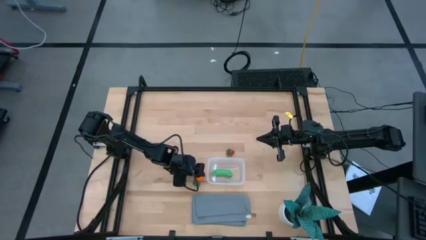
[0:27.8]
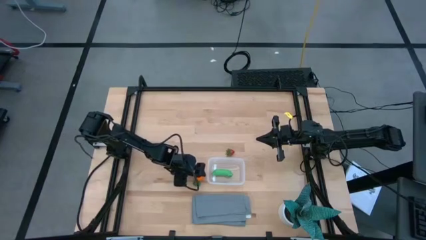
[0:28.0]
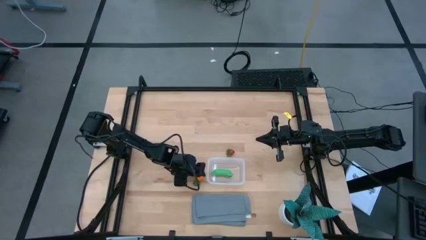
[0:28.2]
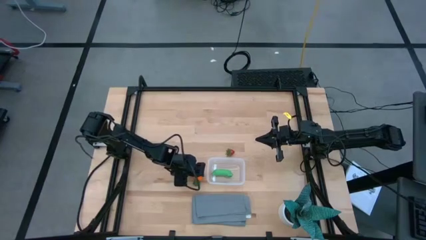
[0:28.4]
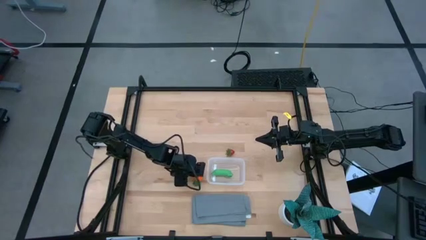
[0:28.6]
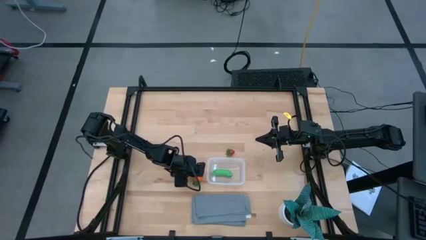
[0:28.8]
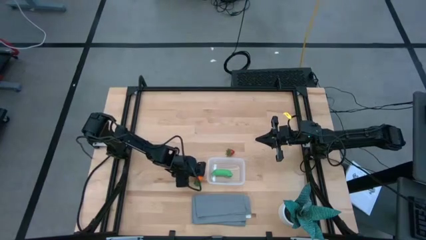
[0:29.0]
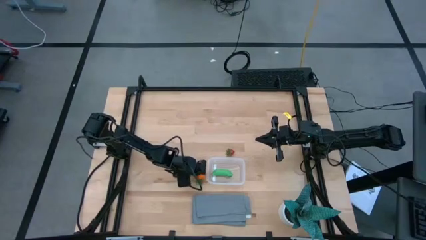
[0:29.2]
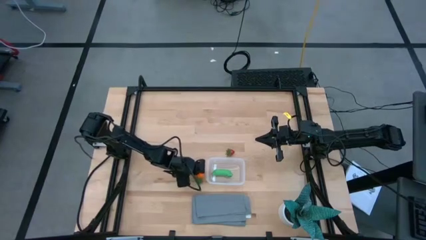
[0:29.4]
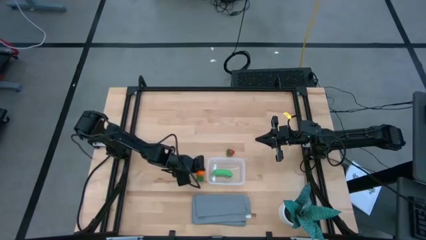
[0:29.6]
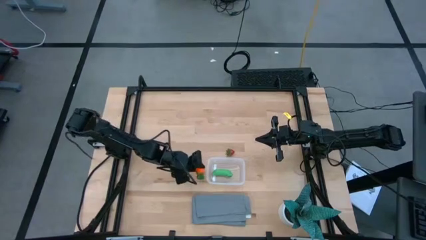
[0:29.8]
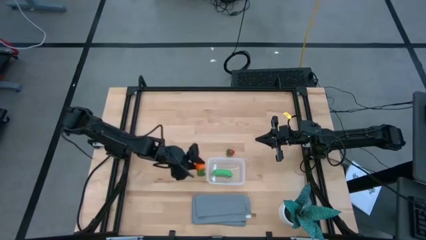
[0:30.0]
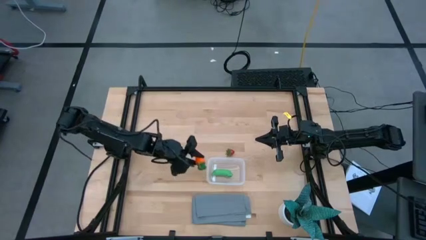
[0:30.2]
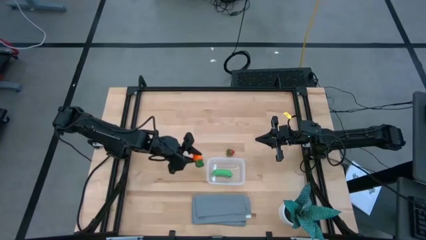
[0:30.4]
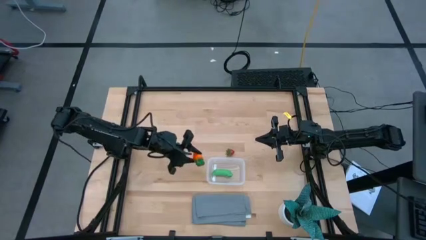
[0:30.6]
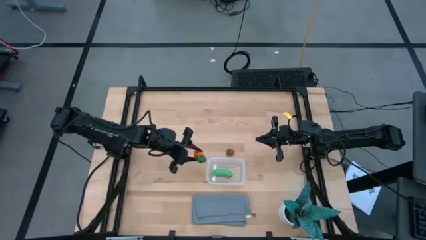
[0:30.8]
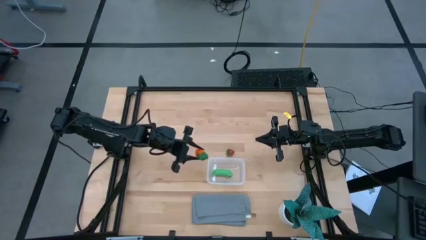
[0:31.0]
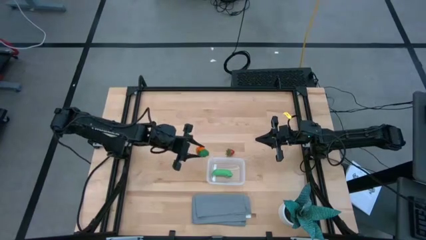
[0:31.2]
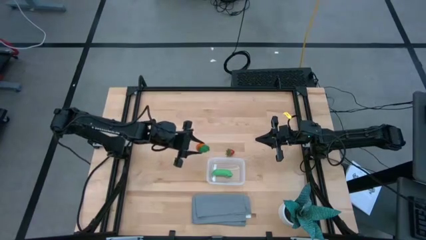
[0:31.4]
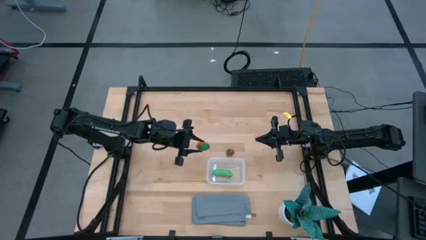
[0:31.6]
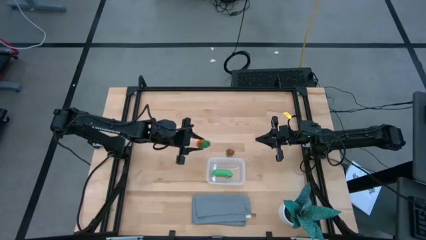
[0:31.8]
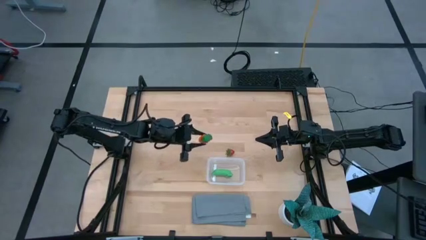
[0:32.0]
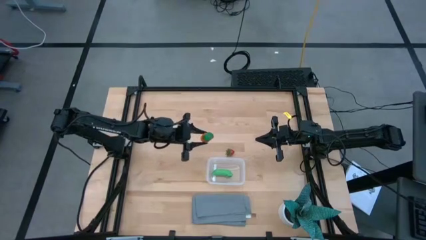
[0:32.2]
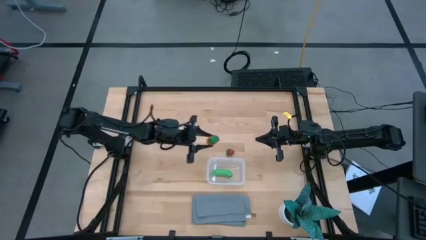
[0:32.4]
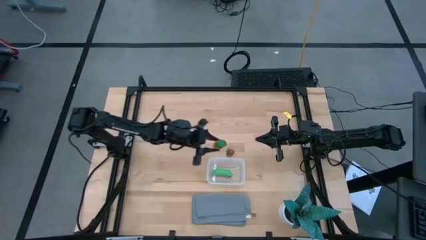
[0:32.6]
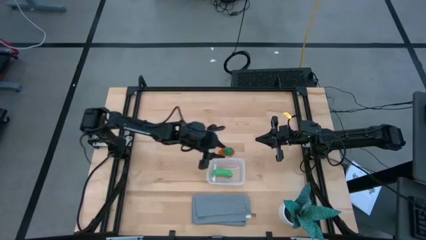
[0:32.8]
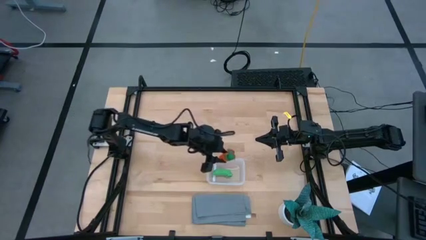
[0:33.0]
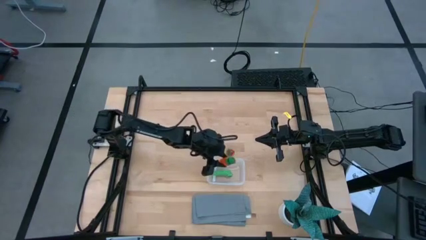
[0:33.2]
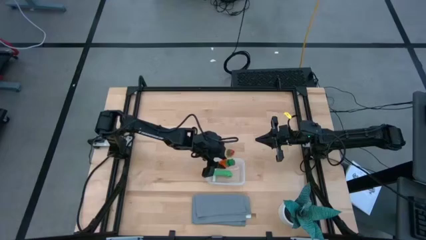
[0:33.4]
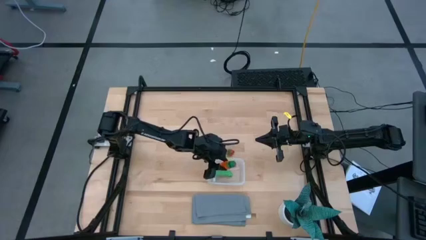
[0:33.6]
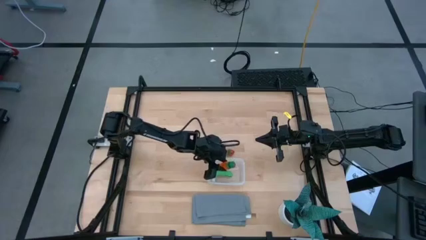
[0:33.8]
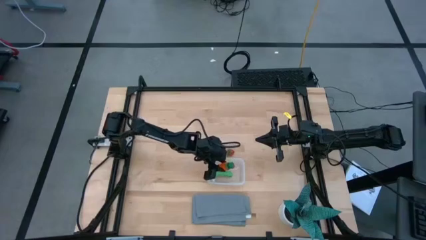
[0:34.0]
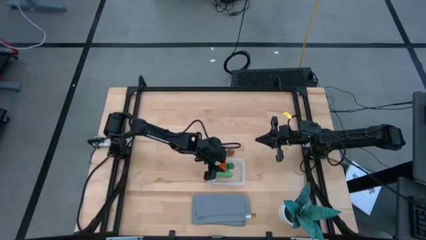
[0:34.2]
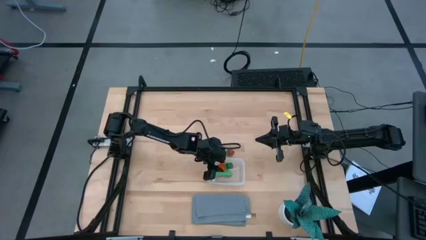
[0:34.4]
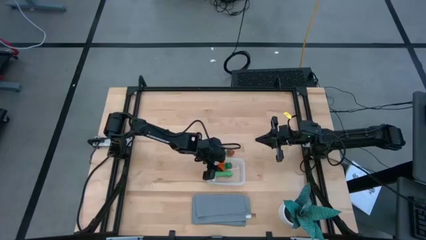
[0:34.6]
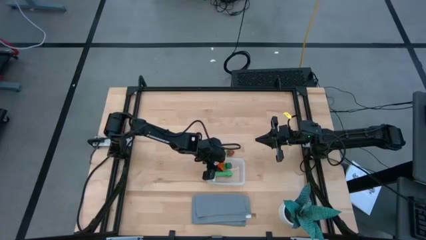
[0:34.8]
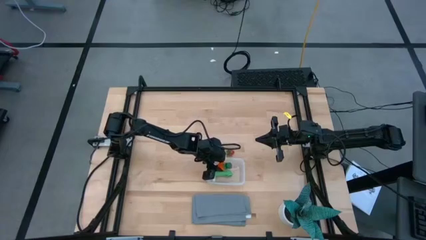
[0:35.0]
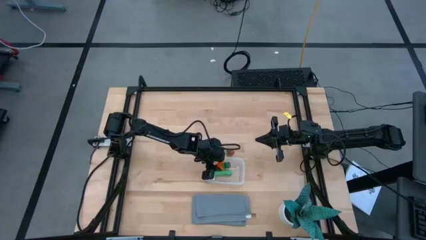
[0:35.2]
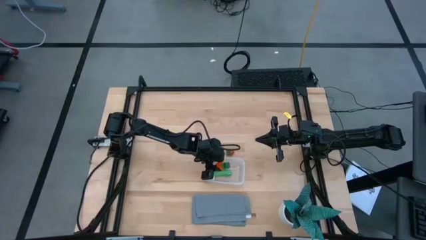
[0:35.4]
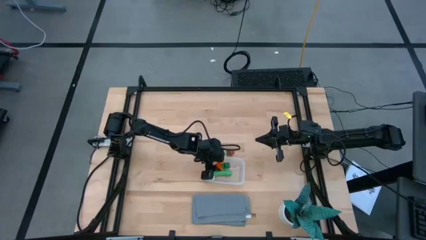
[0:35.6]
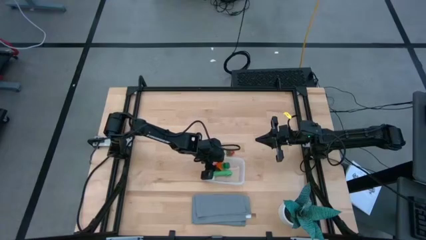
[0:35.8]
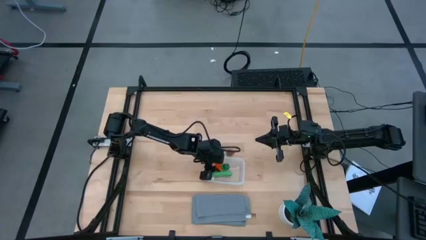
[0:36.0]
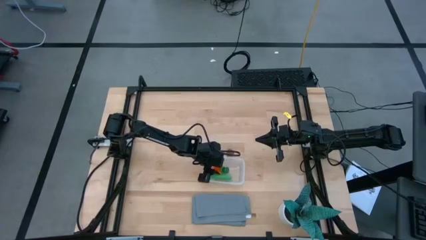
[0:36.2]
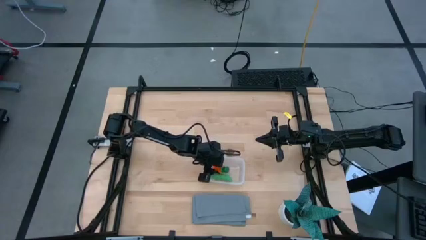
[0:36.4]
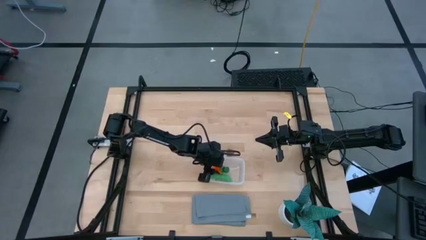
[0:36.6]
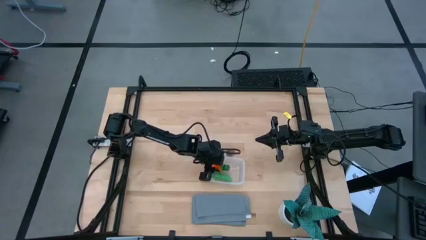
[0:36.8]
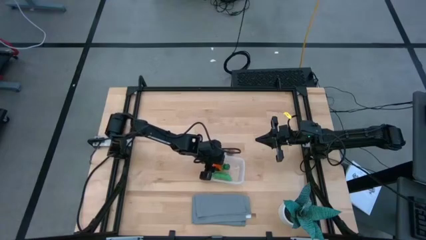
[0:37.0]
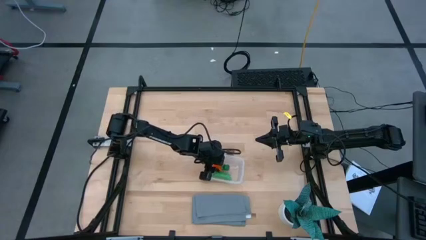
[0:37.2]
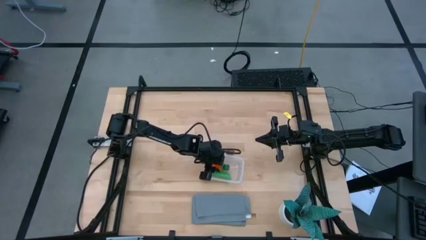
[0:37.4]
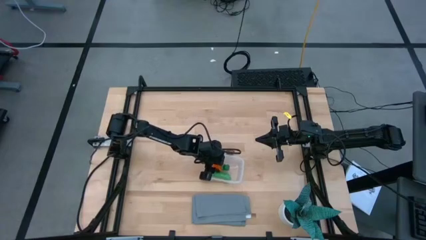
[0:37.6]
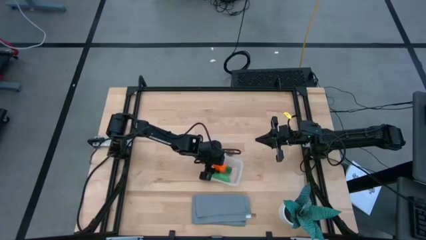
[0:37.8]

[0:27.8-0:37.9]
Task: Pick and placing Produce into tupperware
Put the carrot into the transparent bin

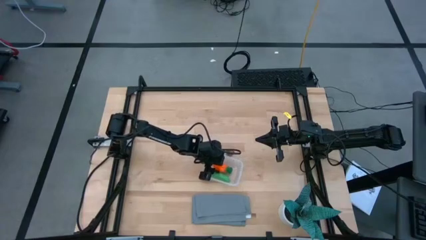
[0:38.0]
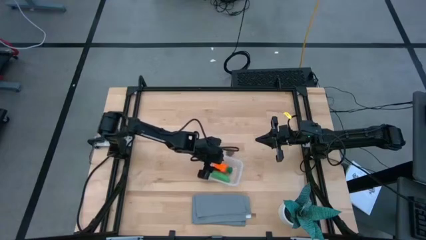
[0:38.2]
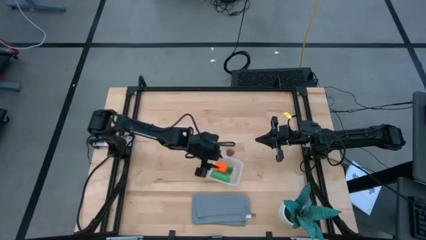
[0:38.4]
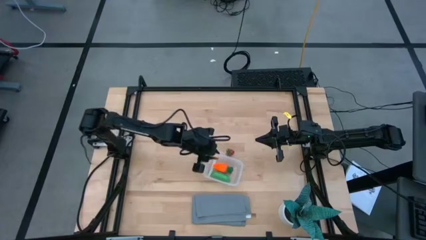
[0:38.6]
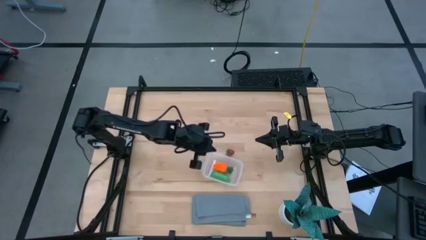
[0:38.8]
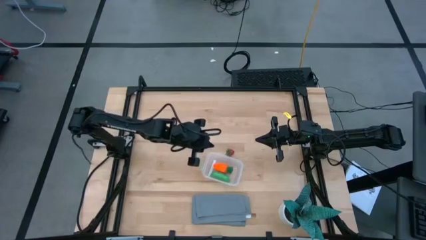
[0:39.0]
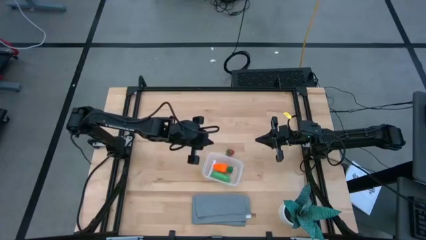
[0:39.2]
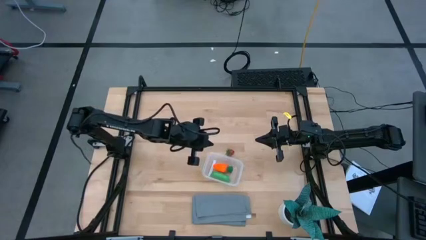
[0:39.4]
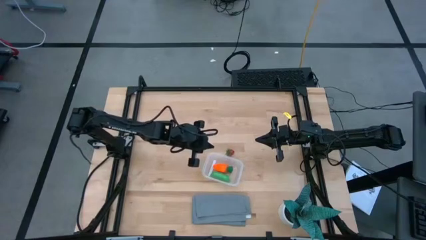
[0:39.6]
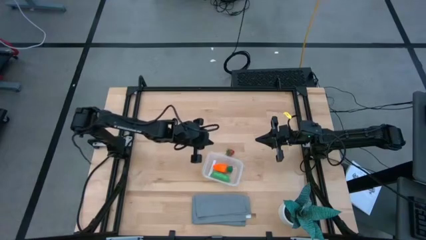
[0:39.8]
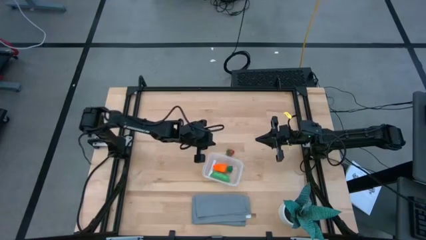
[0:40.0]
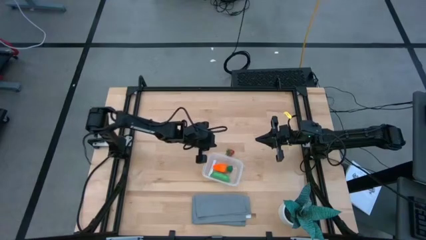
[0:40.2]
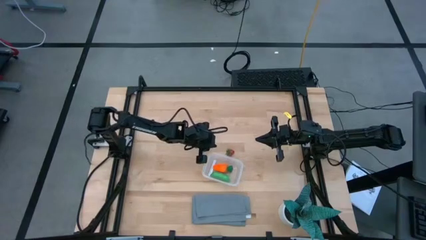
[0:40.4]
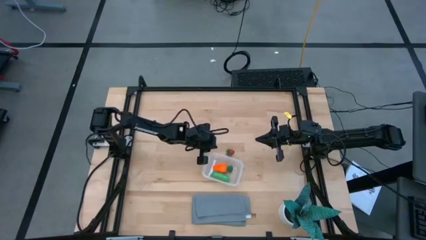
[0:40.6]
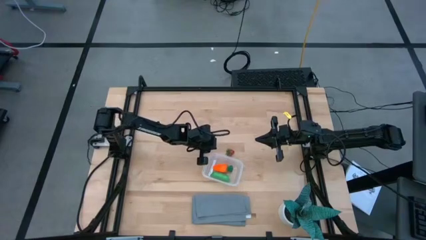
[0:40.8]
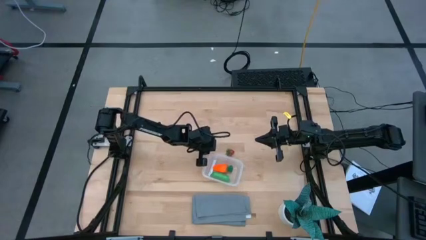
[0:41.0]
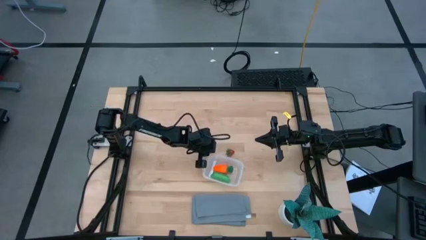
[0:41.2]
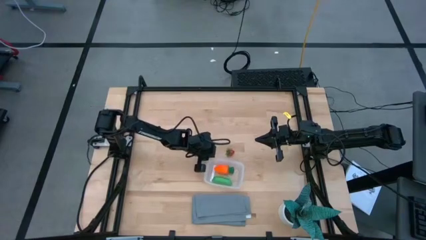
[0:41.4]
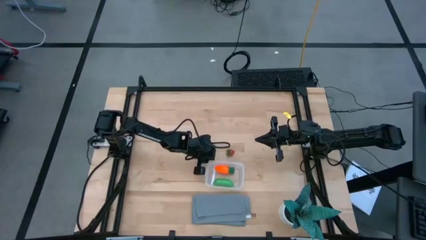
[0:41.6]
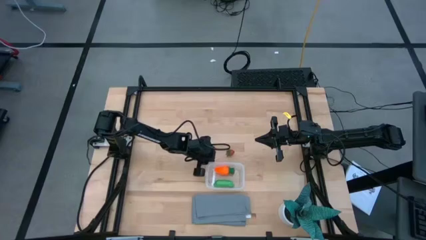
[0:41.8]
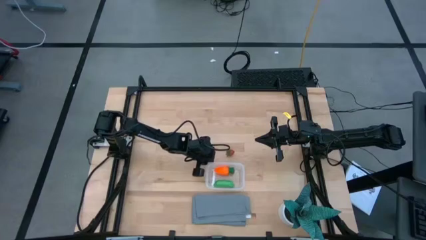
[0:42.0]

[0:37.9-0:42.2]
Adjust the transparent bin
